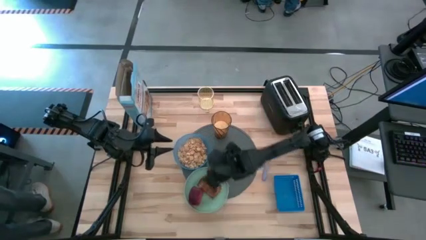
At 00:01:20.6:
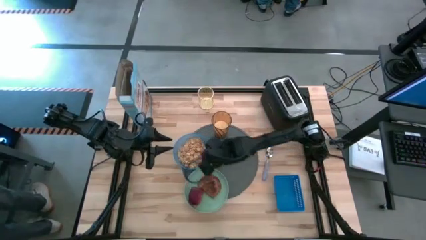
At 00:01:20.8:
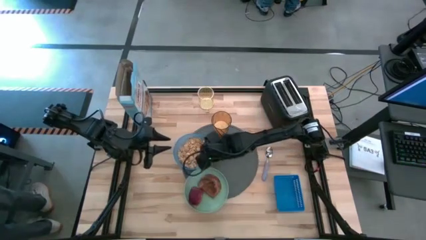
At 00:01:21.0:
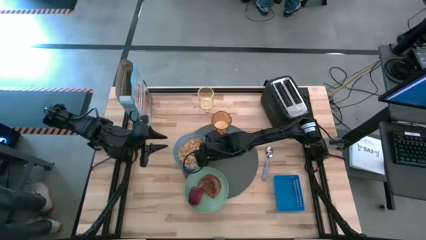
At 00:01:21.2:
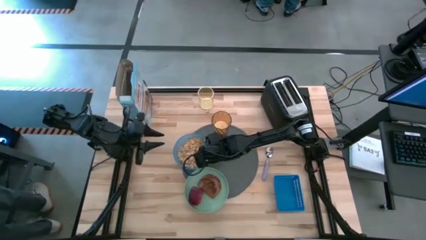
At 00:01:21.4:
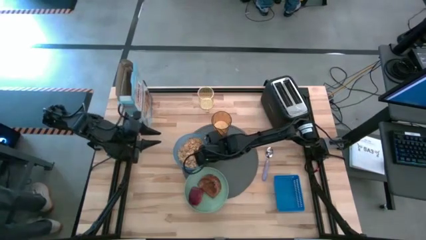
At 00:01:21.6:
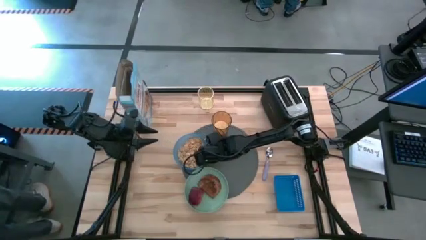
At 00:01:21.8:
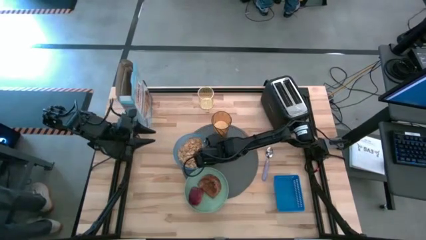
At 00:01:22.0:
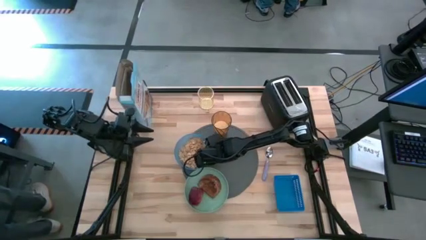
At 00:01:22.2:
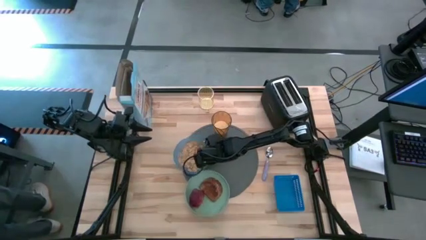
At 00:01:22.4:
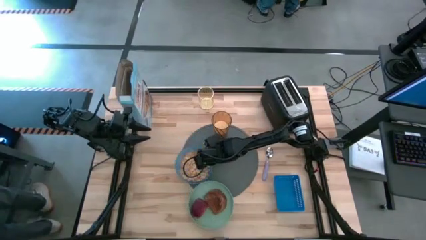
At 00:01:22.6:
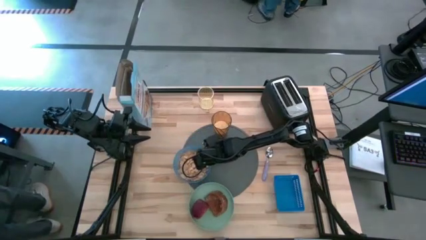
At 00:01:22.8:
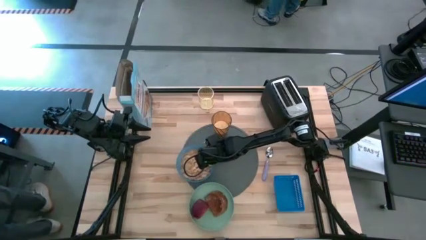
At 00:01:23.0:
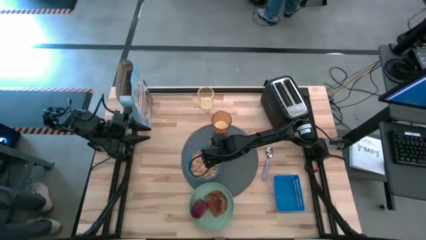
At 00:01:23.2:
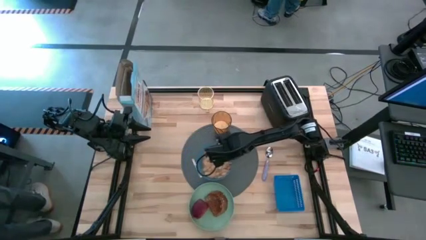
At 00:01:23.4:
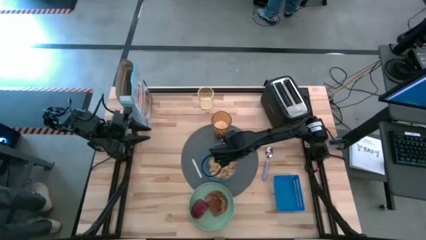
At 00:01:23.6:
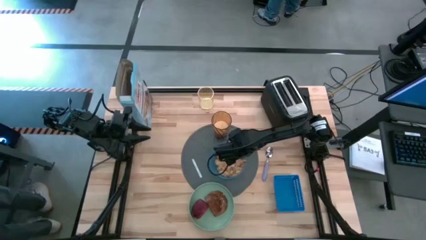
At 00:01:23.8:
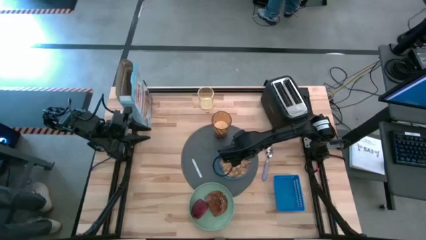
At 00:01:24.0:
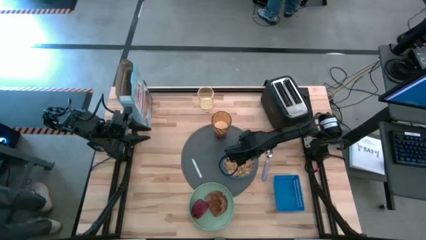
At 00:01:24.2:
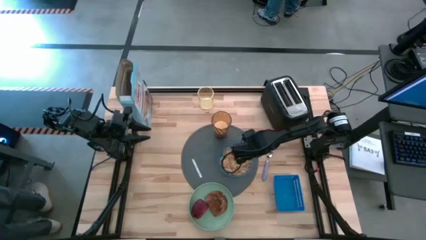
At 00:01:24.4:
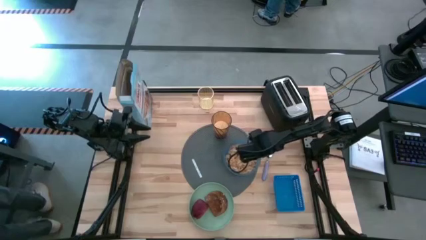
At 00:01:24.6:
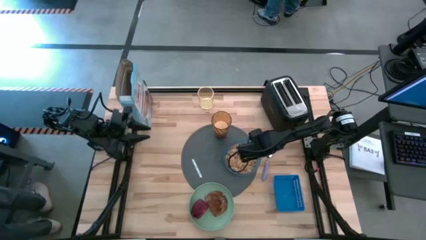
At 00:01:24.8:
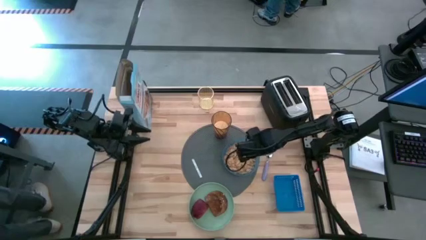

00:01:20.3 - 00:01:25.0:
Task: Arrange a breakfast setting
Move the blue bowl to the right side of the table mat

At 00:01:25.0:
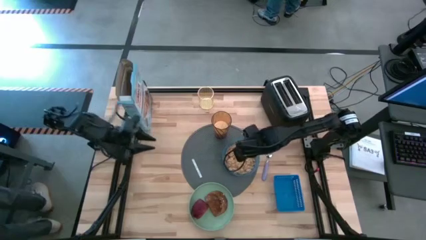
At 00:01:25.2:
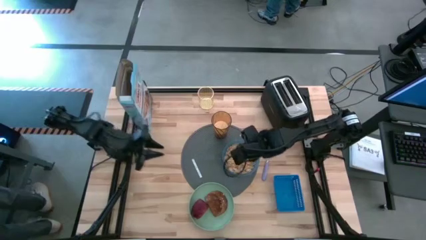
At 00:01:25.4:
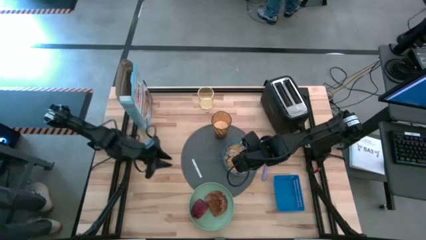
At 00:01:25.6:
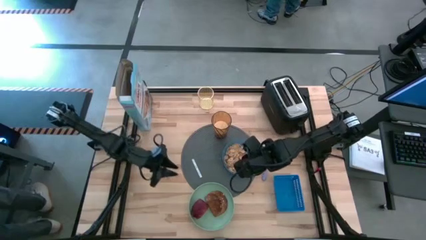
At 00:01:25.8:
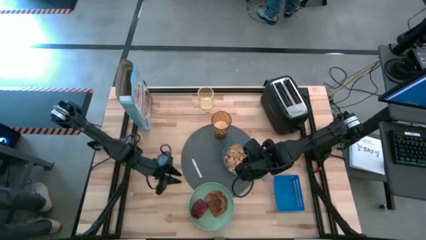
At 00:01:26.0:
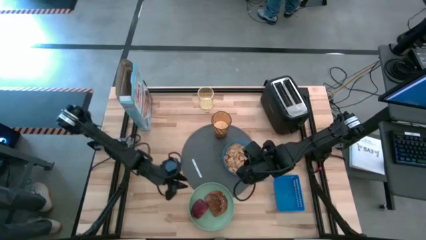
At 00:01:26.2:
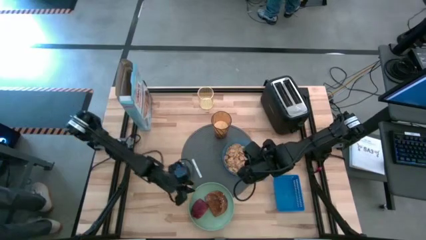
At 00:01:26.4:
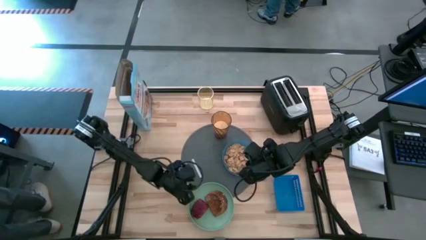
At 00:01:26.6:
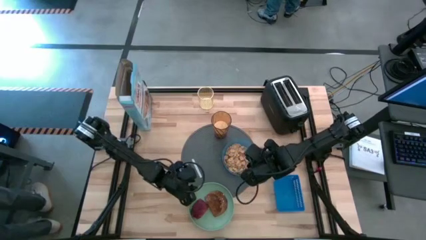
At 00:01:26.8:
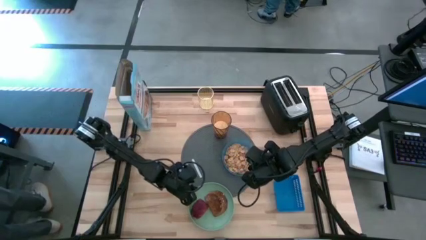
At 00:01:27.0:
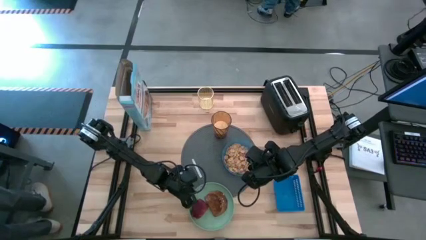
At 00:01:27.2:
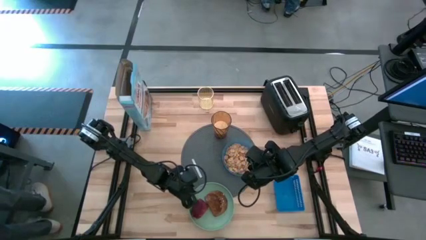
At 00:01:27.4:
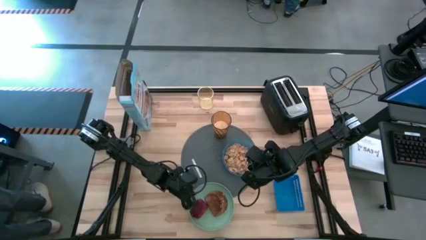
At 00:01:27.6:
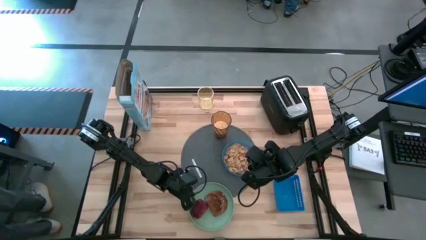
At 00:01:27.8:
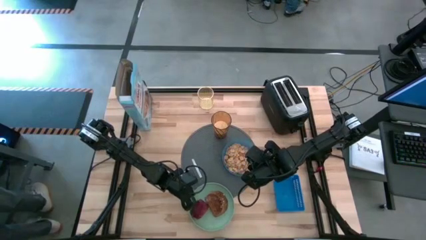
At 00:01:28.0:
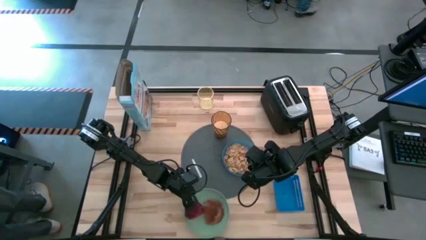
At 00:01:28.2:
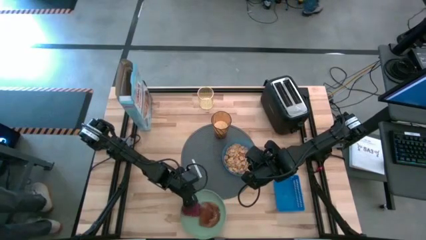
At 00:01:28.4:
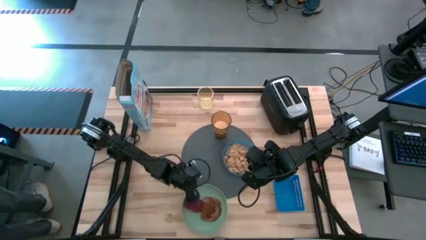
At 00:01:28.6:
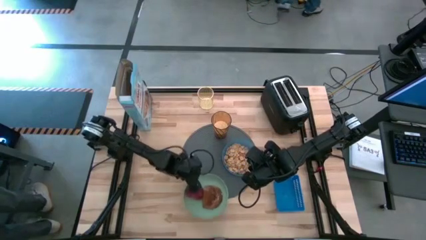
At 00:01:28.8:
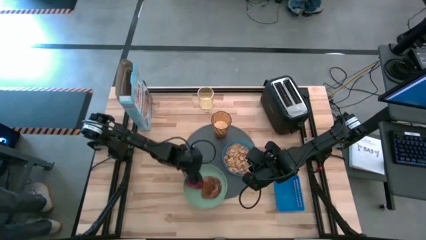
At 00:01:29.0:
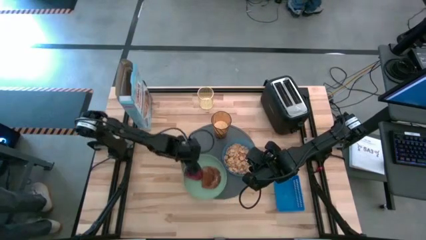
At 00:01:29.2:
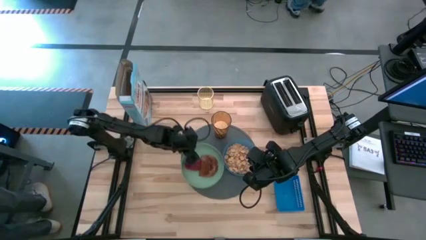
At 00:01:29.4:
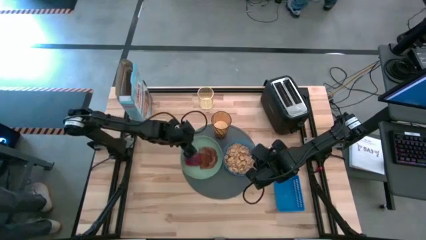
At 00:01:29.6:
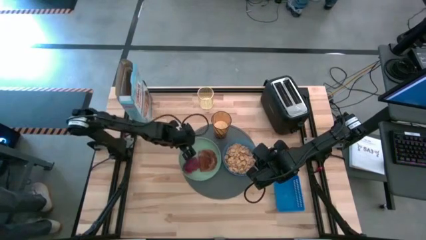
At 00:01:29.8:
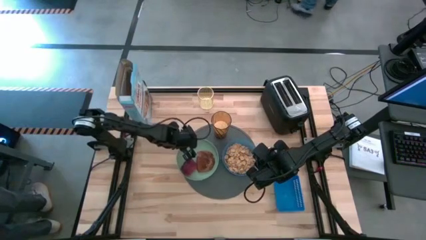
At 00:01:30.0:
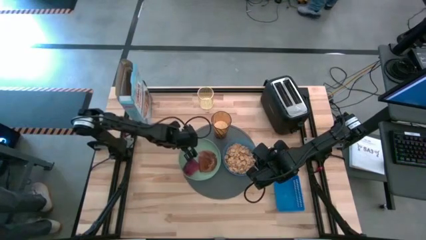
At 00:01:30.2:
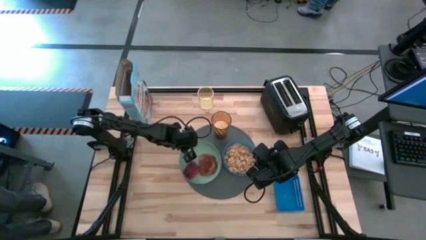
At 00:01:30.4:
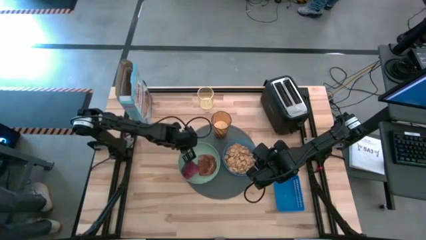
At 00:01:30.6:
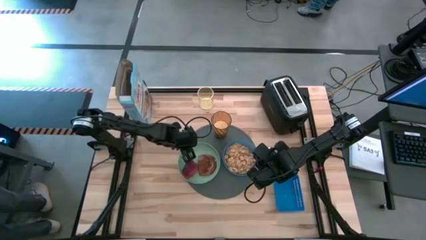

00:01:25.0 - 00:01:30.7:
Move the green plate to the left side of the blue bowl

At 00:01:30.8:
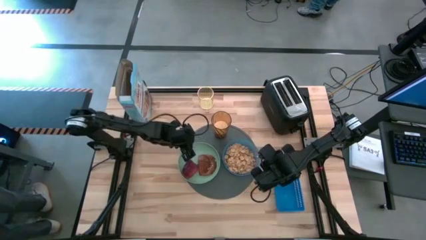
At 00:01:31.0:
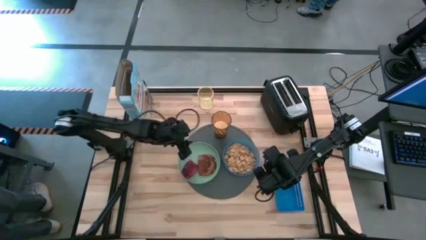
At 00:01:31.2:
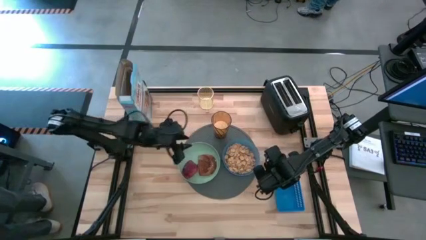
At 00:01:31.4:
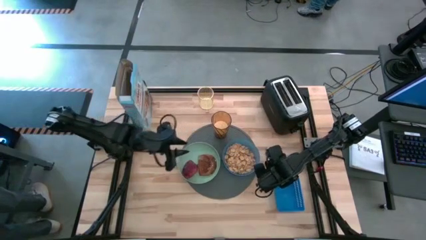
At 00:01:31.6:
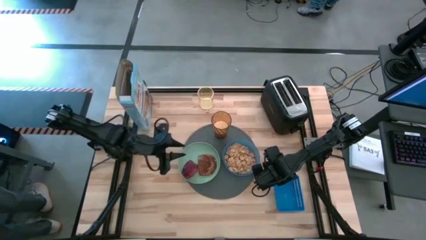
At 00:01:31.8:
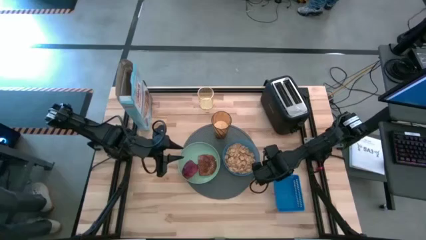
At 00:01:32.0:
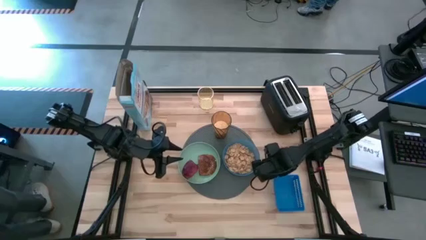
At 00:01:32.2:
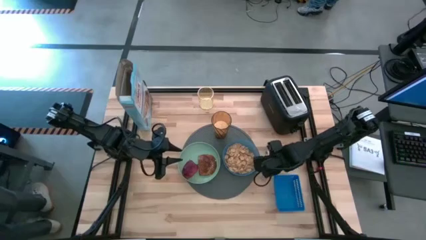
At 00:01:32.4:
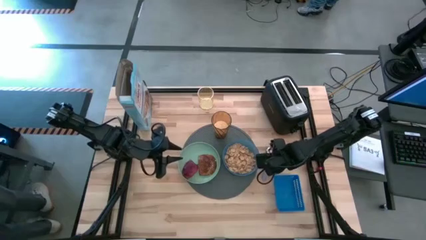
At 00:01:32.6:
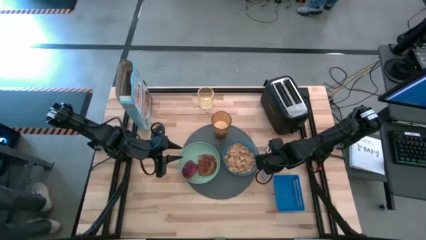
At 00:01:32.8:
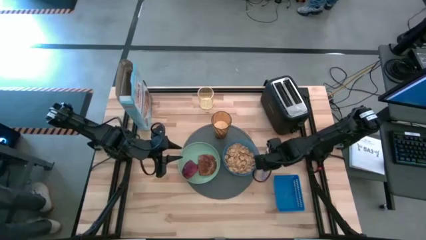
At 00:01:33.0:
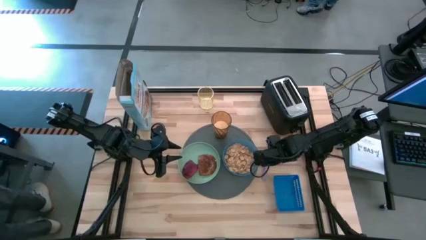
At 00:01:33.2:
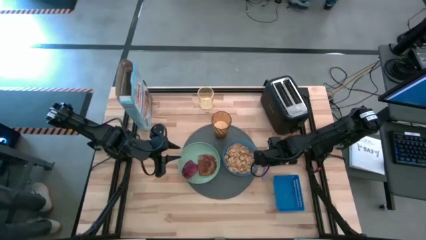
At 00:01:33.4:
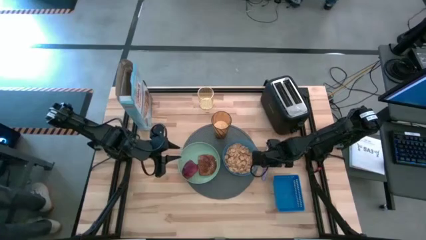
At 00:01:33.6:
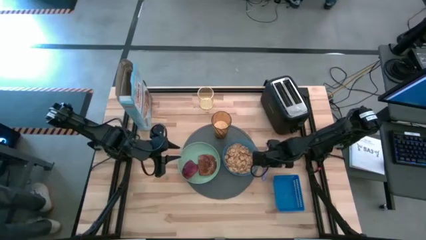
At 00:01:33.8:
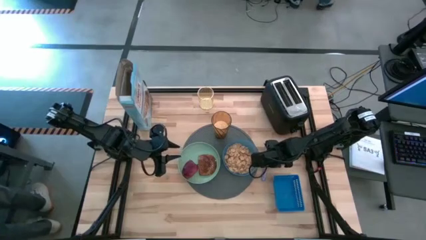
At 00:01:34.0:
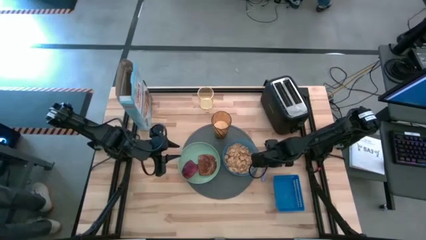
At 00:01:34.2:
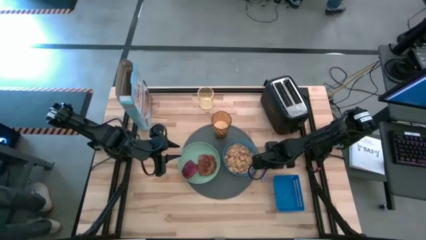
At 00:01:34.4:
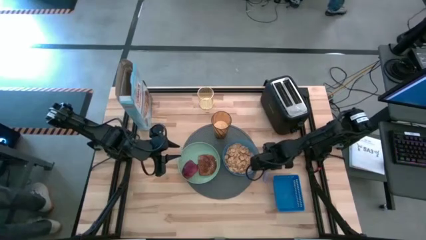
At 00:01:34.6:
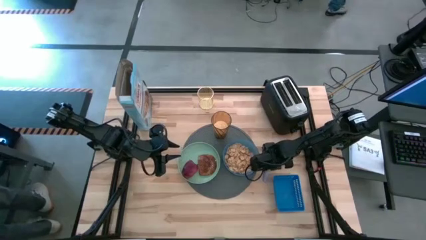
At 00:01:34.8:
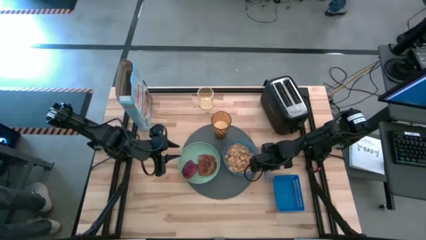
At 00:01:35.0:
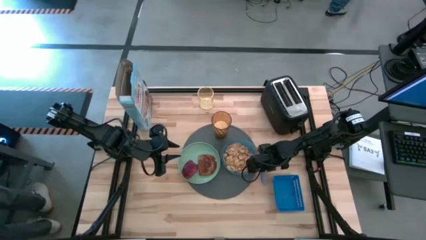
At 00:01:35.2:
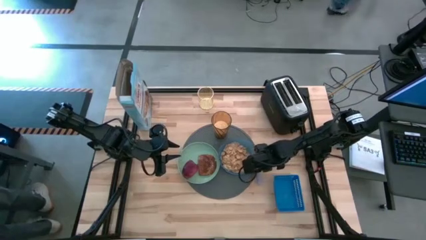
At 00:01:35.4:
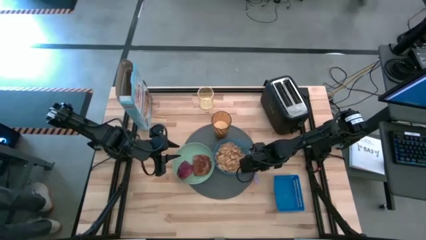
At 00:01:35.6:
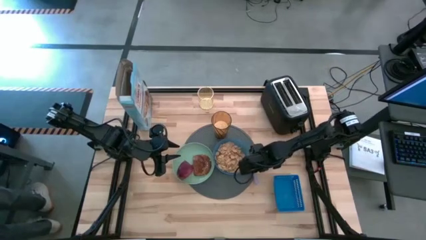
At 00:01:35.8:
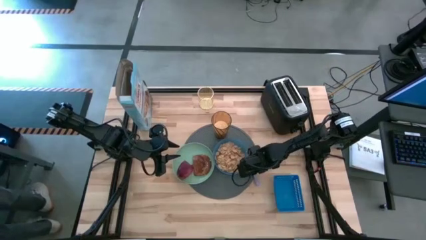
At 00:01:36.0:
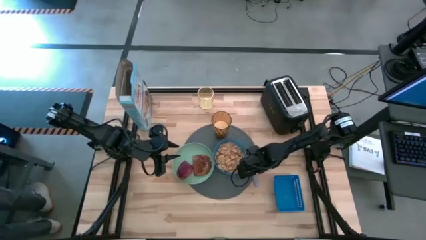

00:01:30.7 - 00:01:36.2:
Adjust the violet spoon to the right side of the bowl
